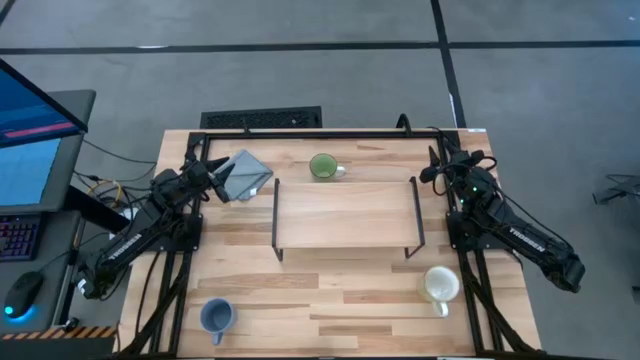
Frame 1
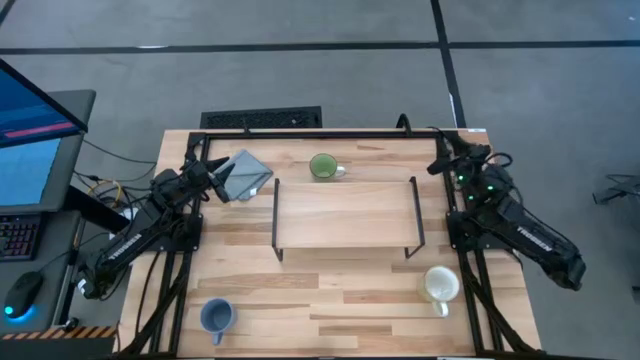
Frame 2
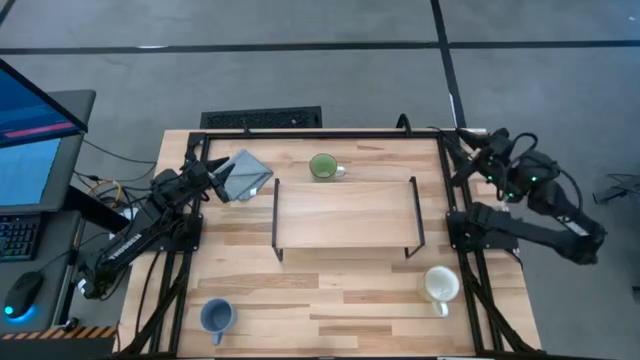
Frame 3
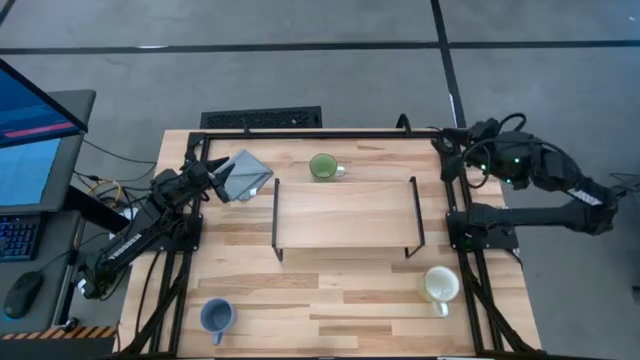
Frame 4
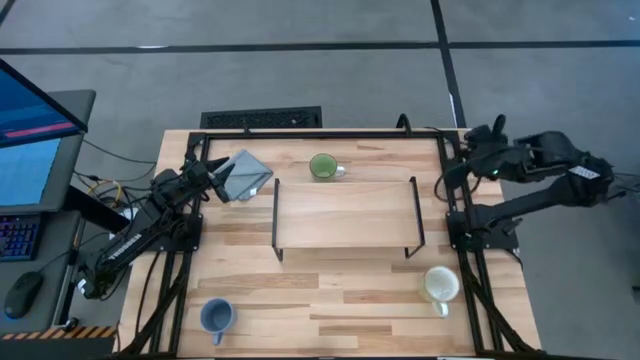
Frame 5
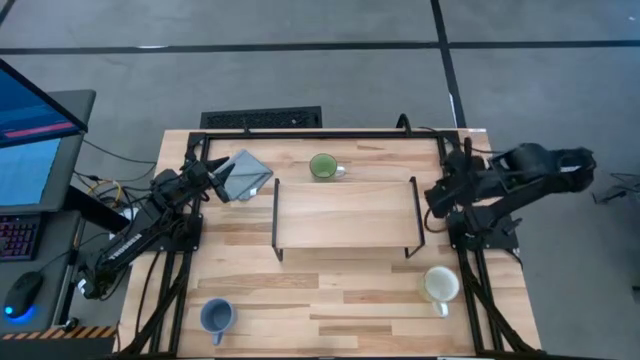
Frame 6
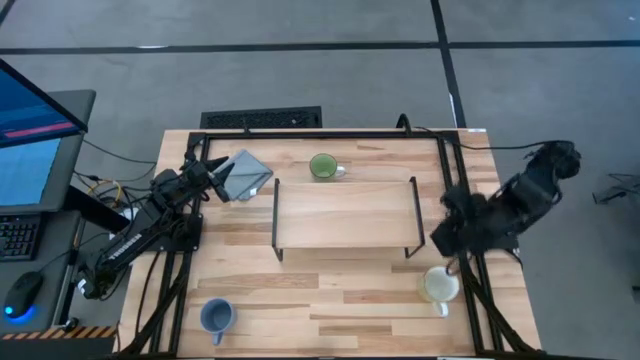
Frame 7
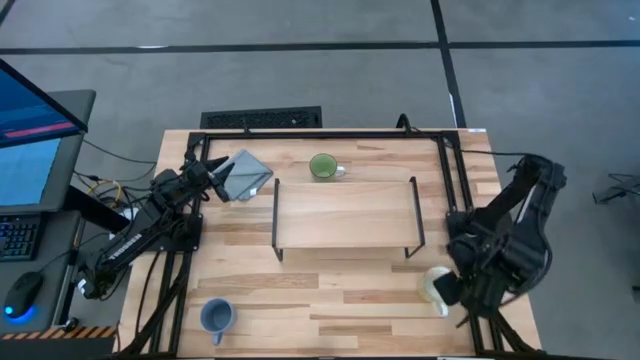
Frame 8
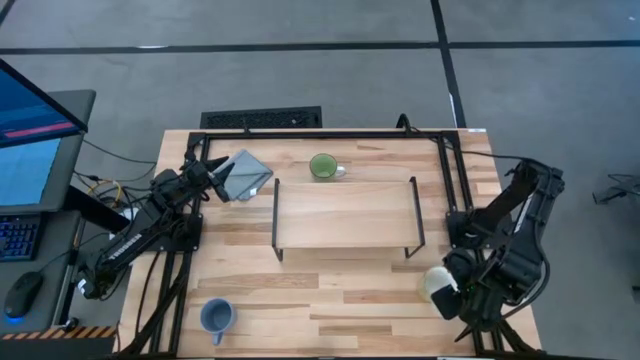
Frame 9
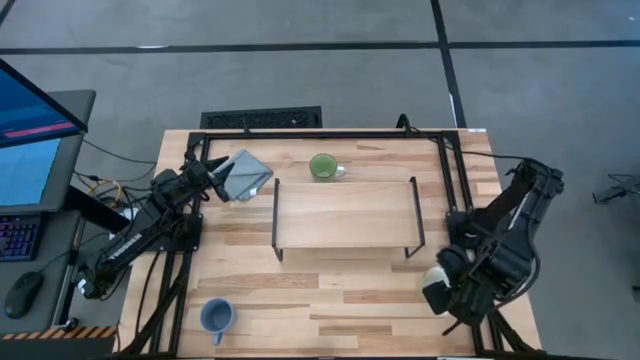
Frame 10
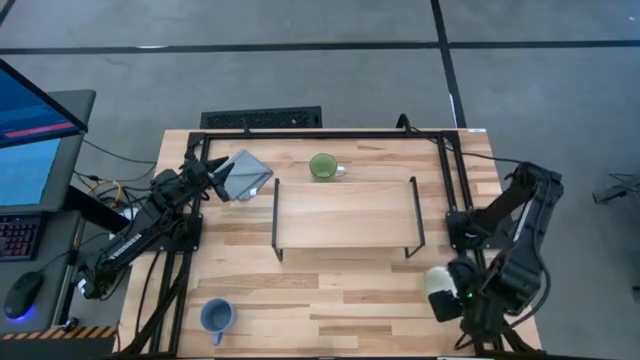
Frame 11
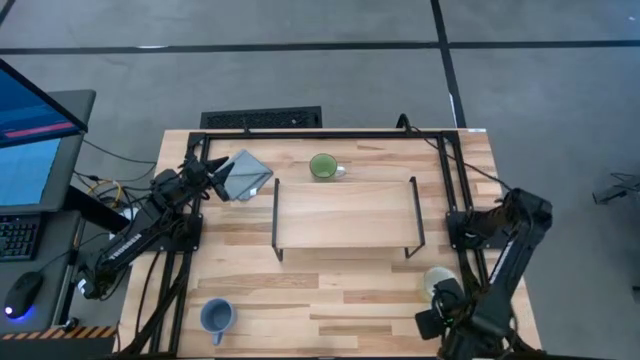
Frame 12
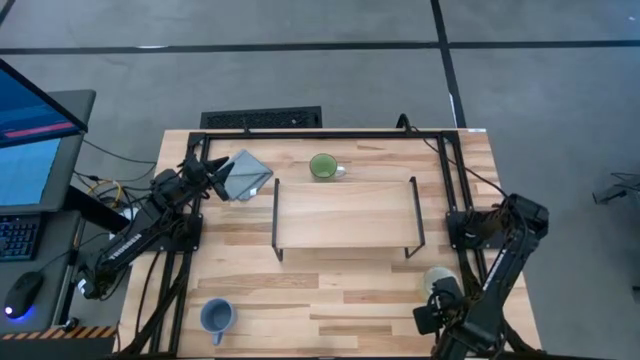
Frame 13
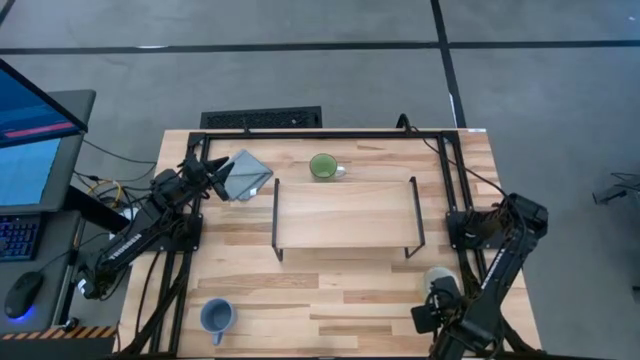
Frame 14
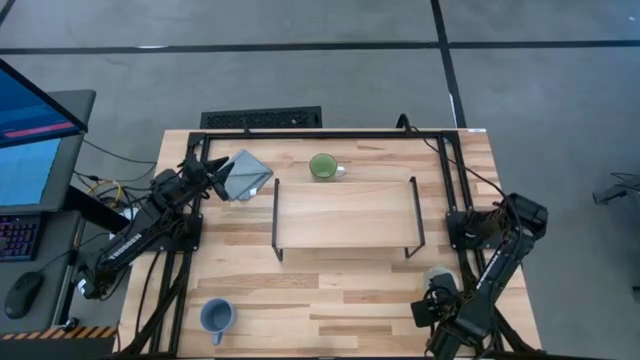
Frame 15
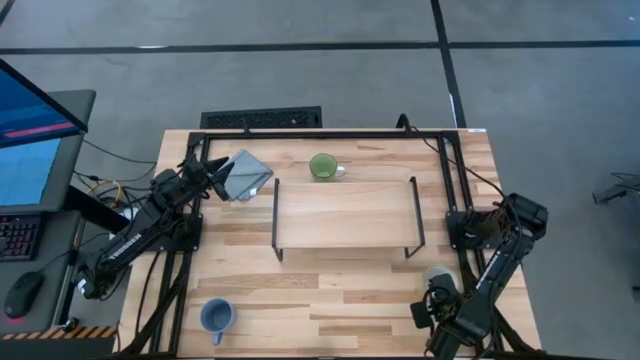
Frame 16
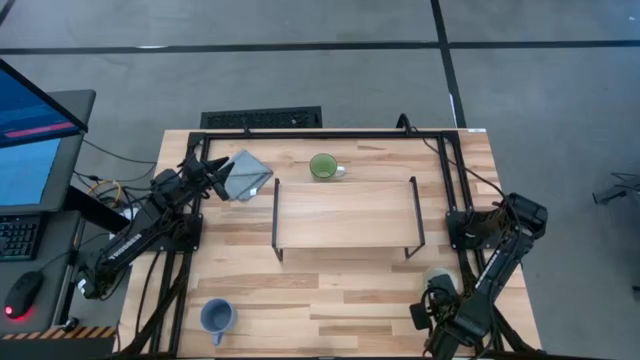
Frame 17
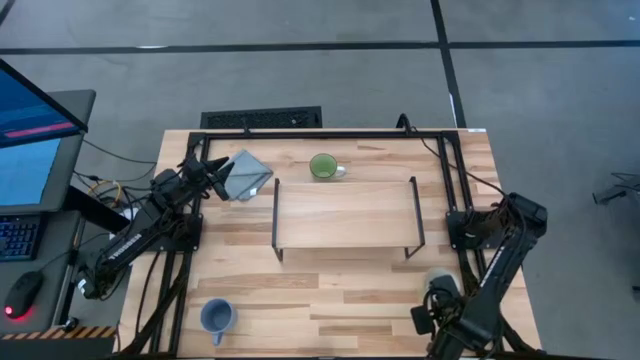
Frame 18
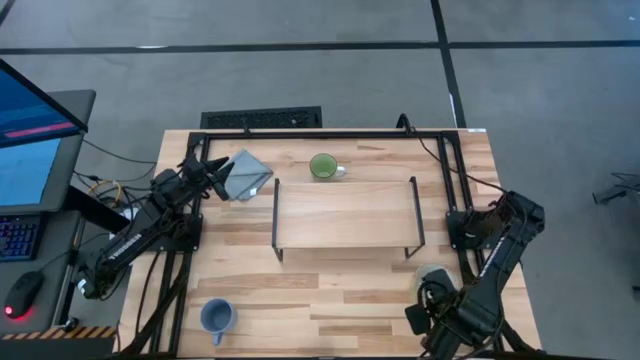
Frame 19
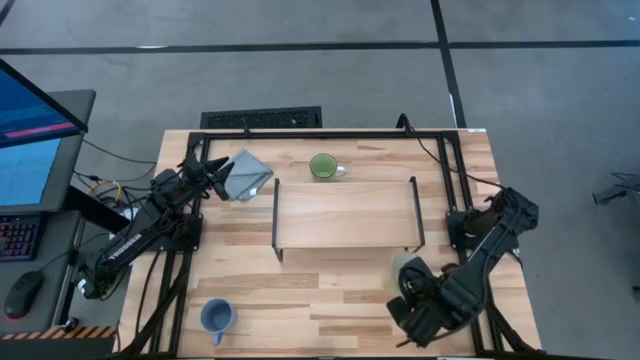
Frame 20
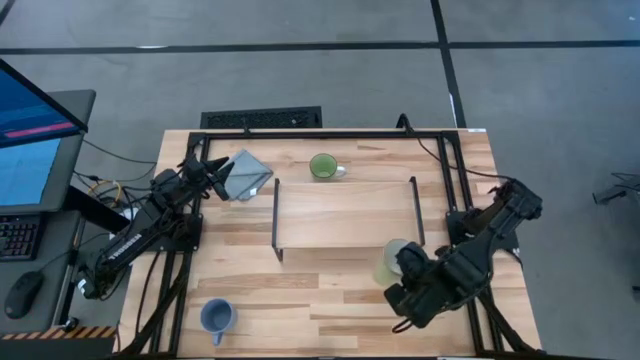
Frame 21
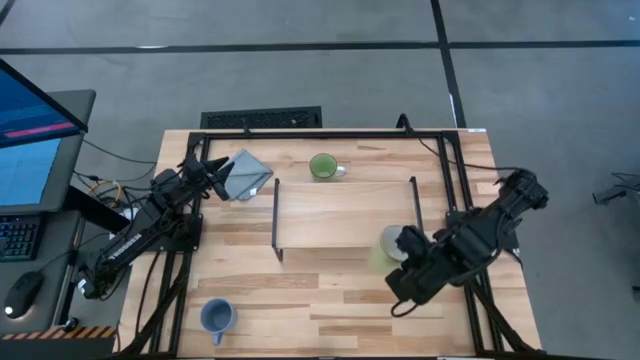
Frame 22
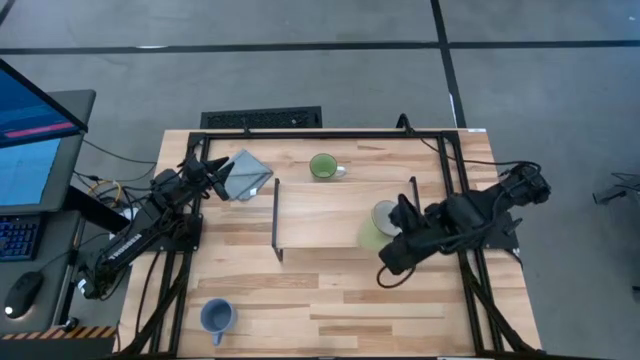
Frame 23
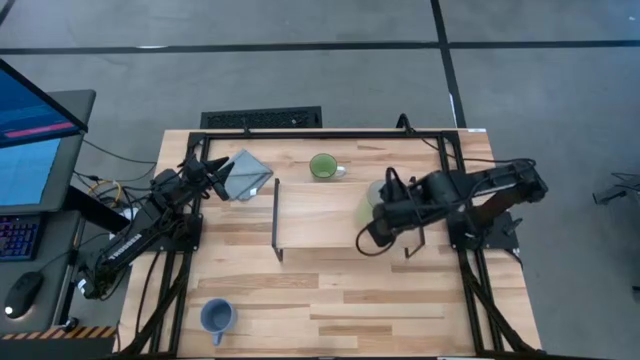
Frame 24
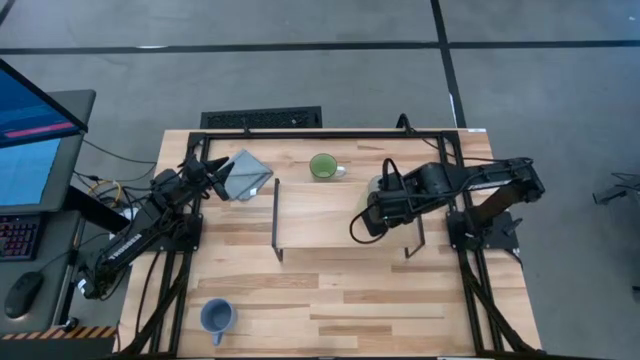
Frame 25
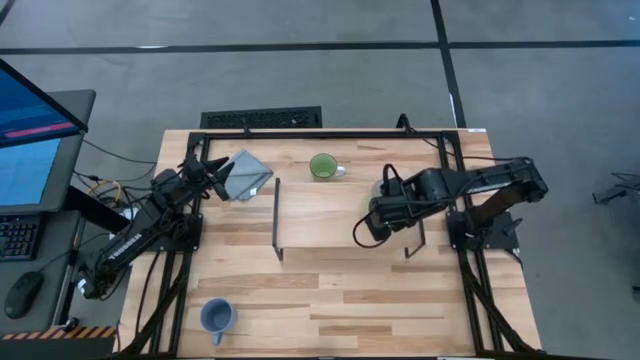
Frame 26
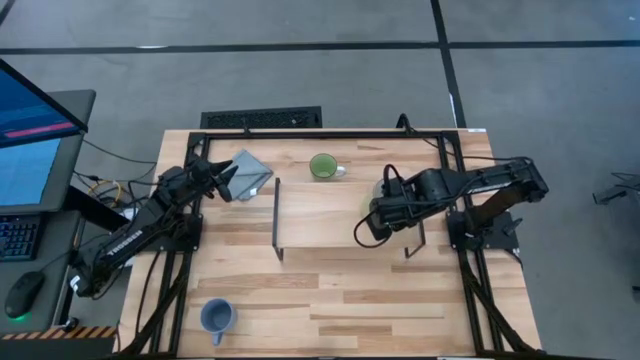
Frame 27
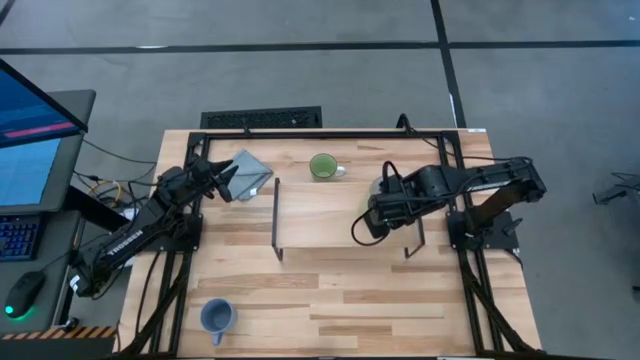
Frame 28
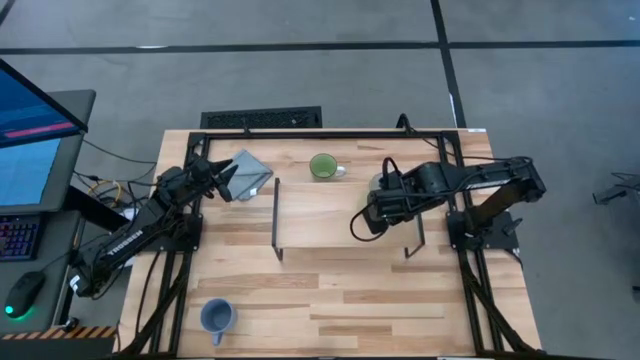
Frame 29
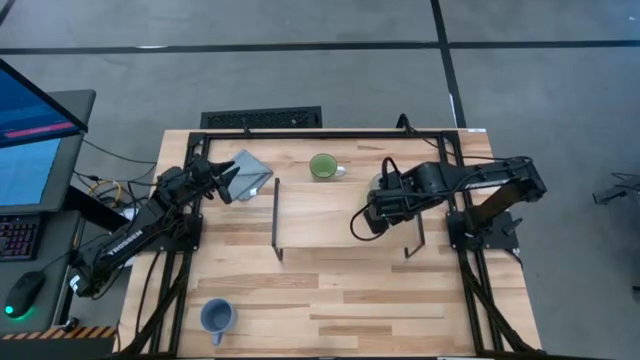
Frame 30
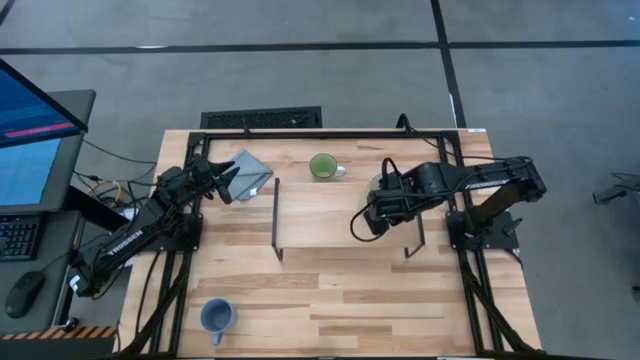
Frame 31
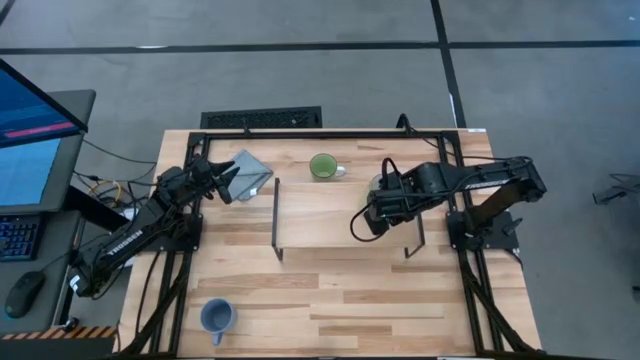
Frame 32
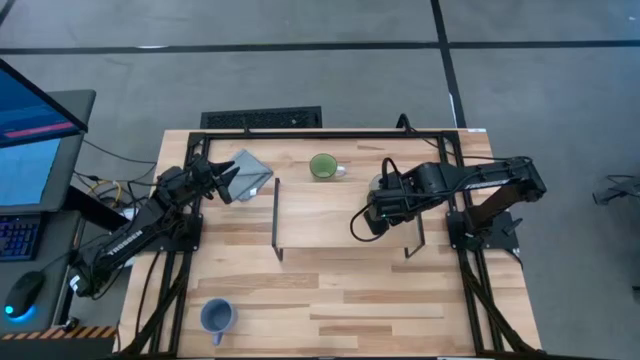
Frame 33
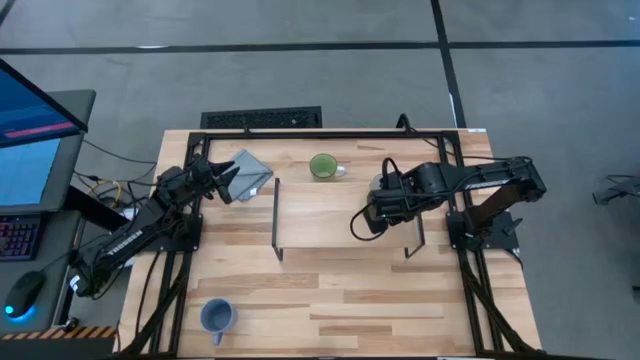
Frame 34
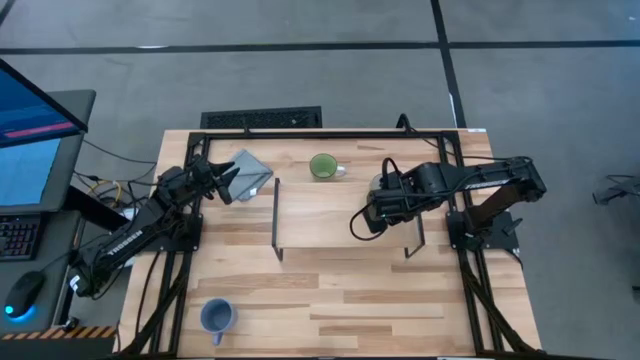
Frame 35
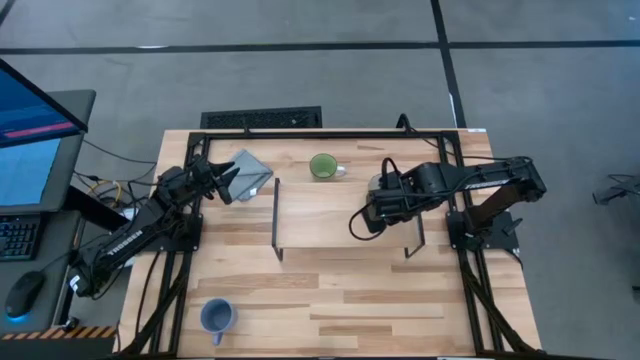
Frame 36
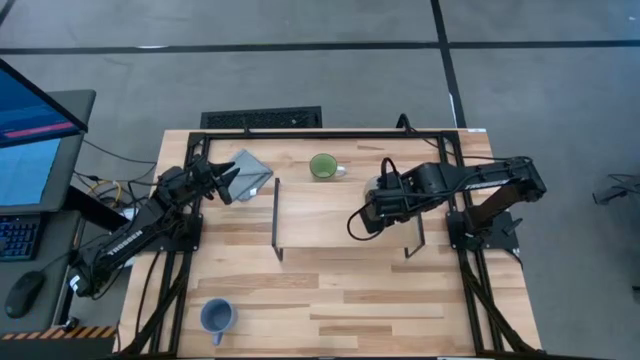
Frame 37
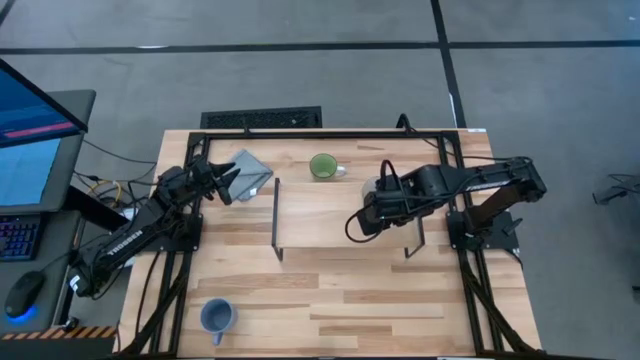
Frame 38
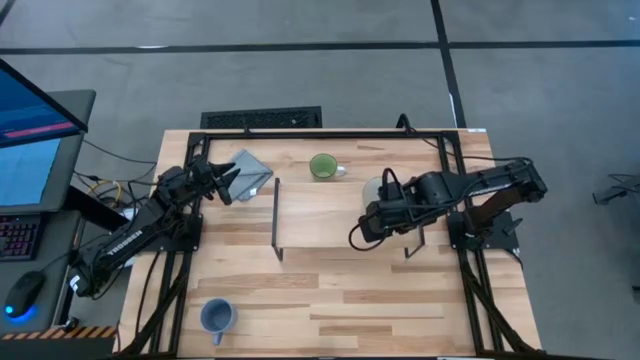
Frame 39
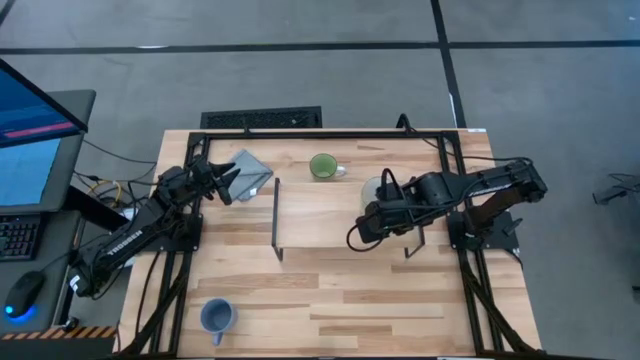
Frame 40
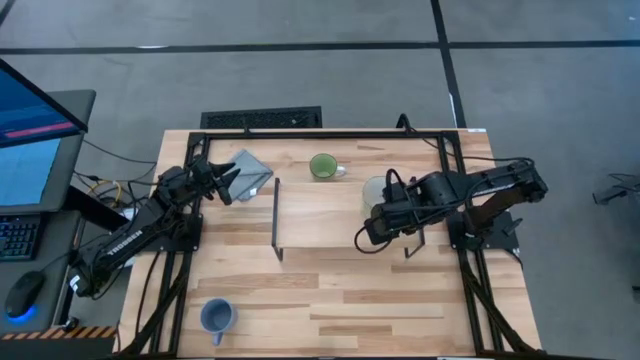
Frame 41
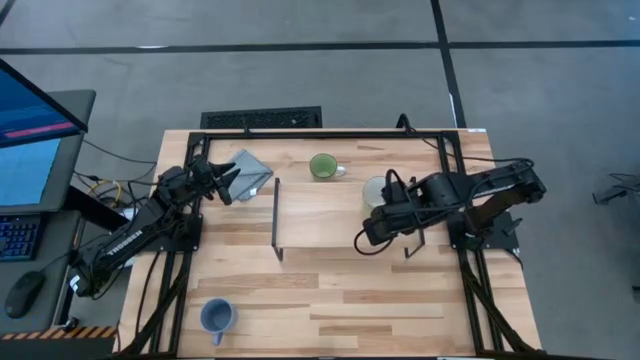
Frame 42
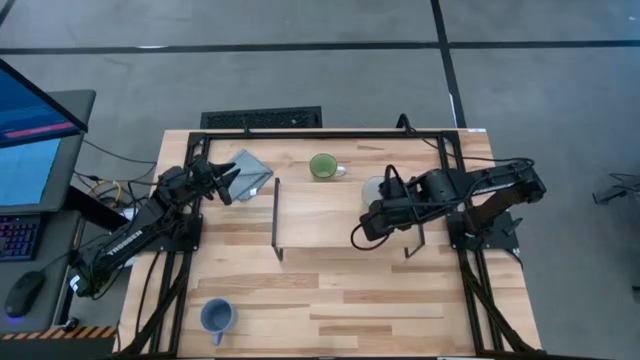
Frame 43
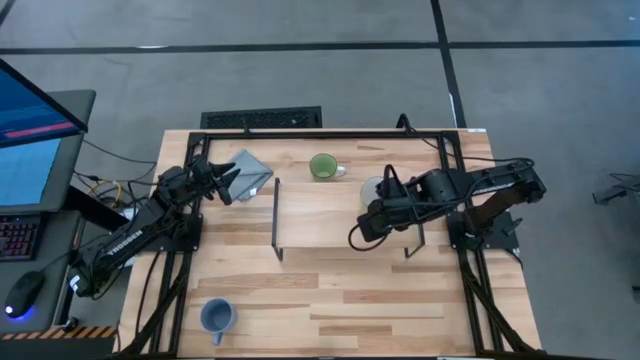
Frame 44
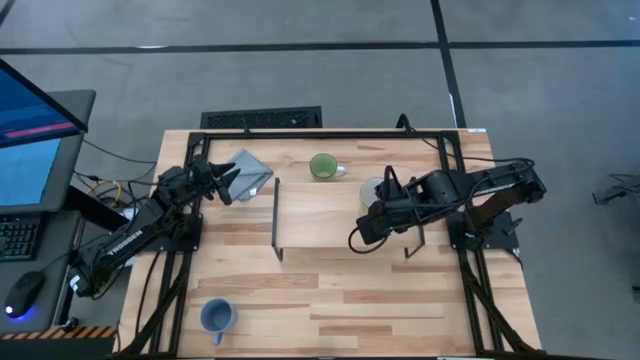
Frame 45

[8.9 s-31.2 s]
Task: Stack small to large cups/mugs on shelf
Put the white mug on the shelf
